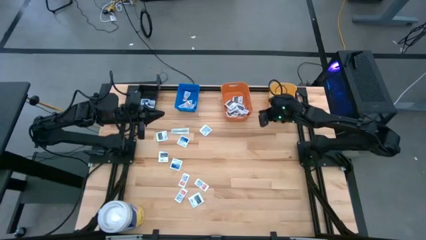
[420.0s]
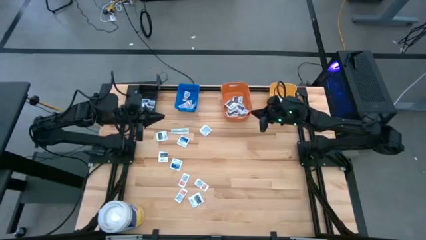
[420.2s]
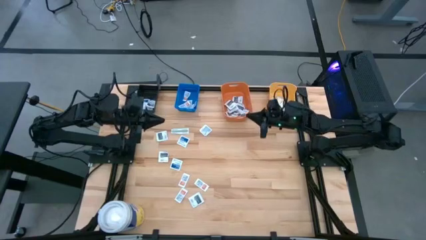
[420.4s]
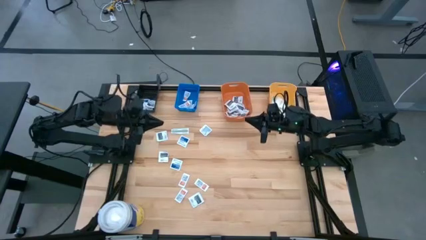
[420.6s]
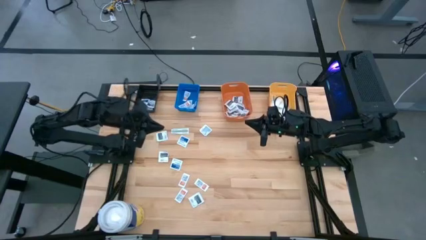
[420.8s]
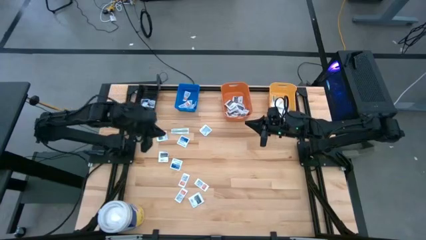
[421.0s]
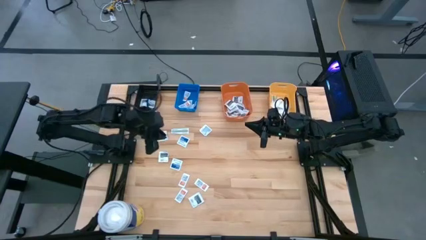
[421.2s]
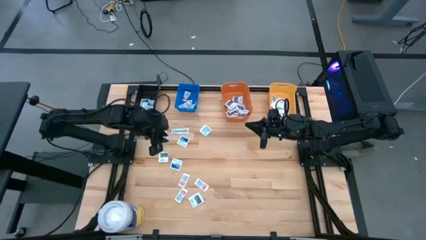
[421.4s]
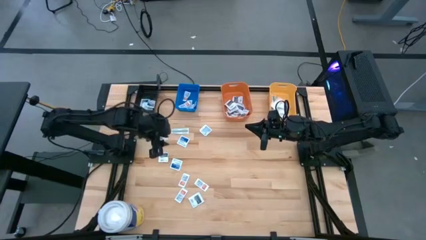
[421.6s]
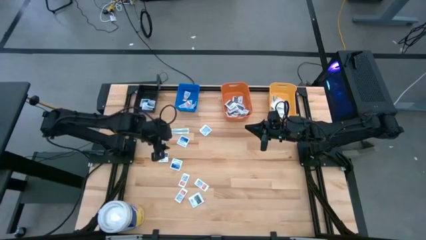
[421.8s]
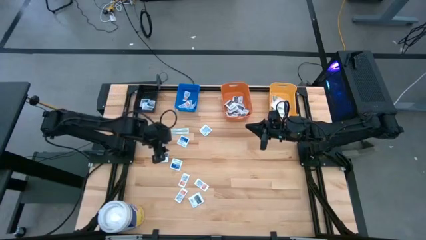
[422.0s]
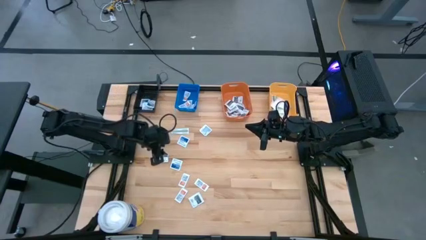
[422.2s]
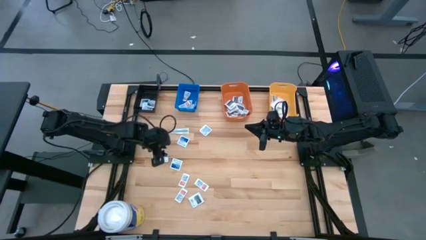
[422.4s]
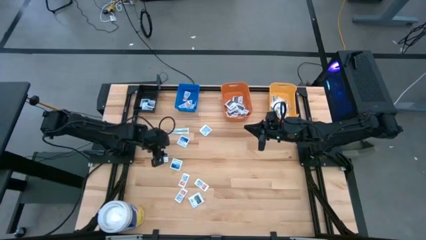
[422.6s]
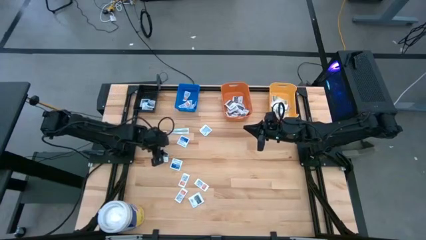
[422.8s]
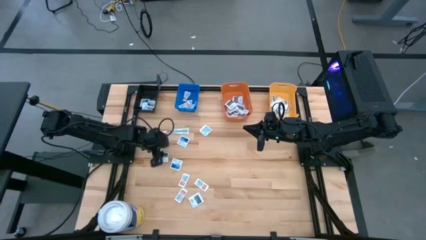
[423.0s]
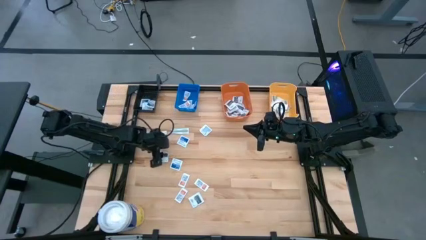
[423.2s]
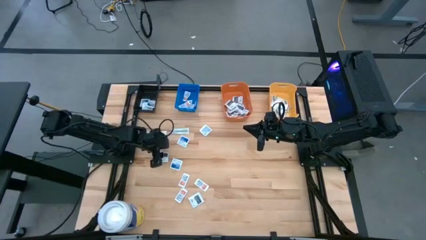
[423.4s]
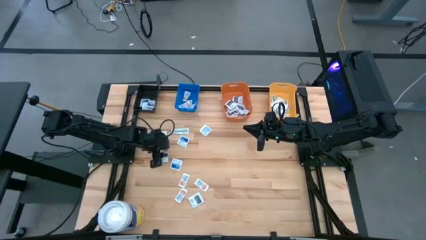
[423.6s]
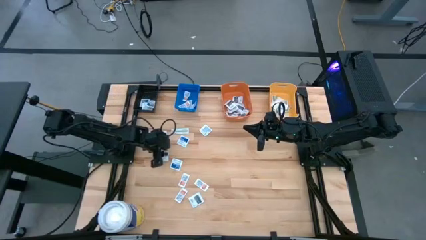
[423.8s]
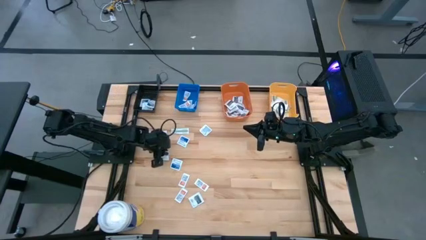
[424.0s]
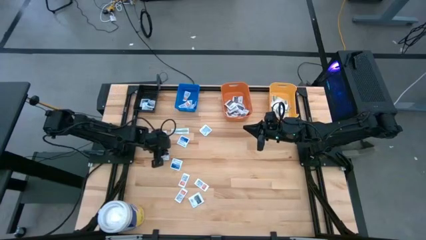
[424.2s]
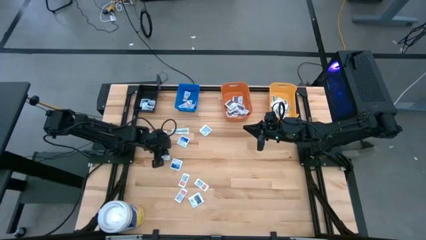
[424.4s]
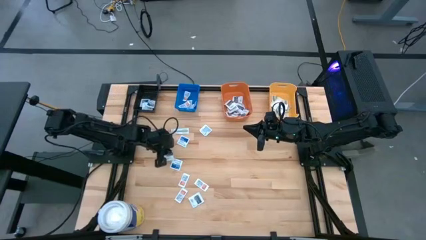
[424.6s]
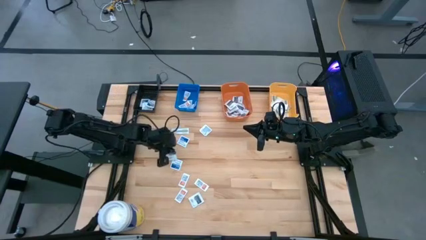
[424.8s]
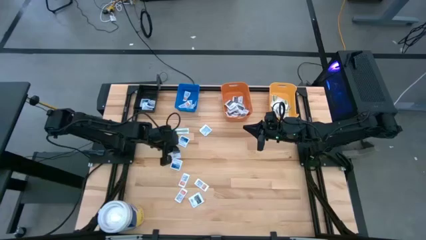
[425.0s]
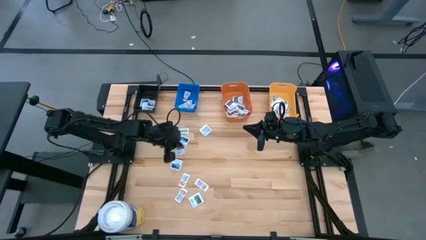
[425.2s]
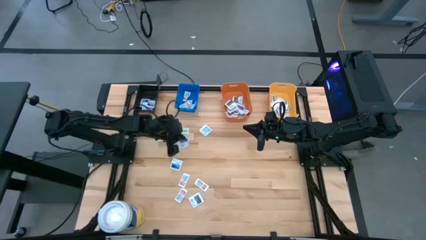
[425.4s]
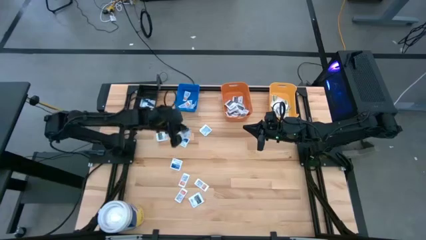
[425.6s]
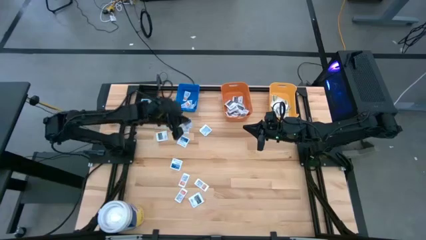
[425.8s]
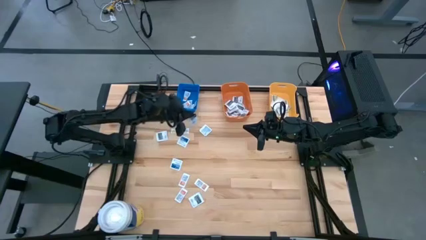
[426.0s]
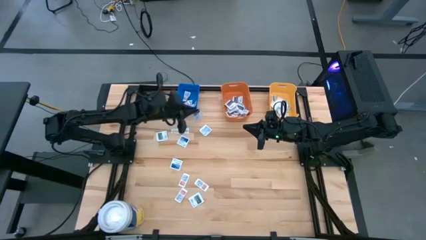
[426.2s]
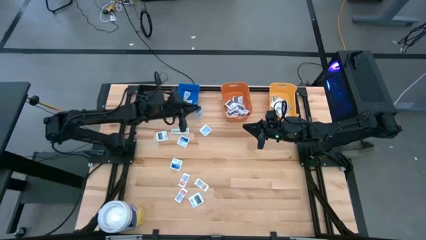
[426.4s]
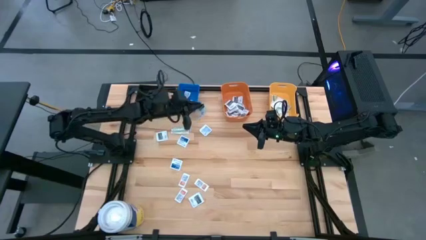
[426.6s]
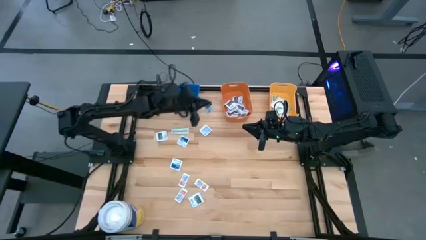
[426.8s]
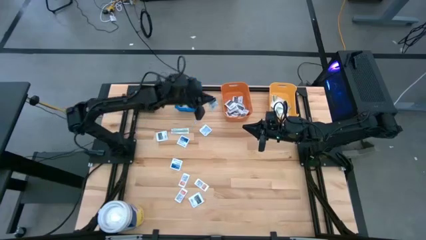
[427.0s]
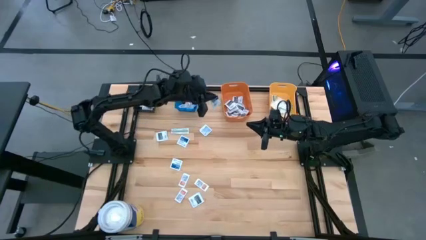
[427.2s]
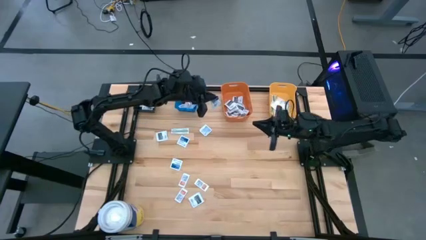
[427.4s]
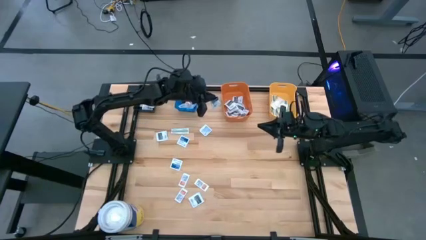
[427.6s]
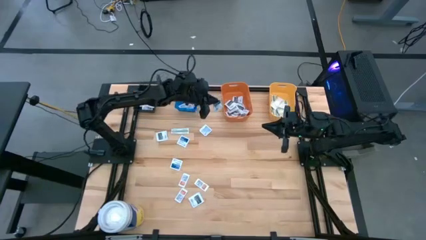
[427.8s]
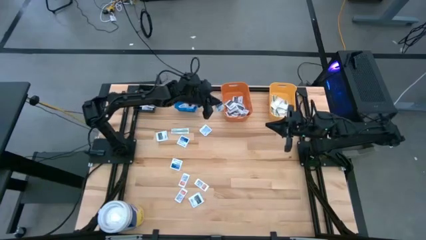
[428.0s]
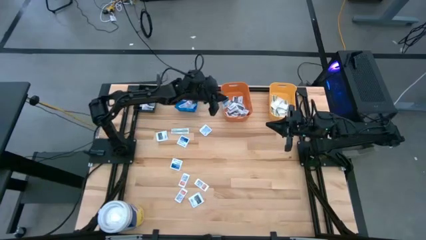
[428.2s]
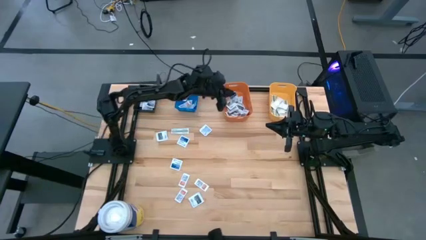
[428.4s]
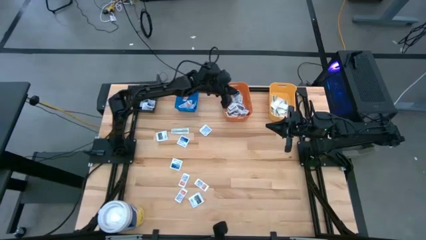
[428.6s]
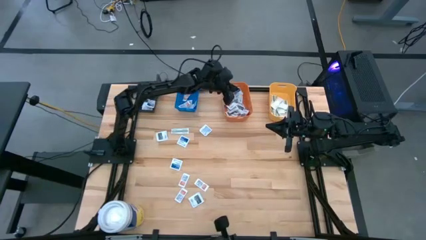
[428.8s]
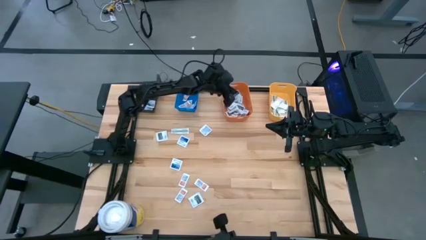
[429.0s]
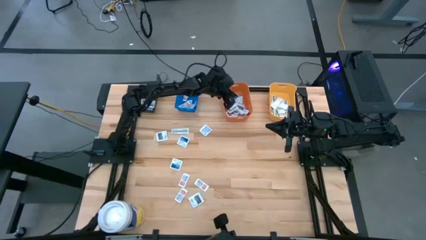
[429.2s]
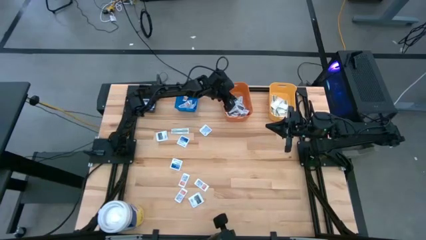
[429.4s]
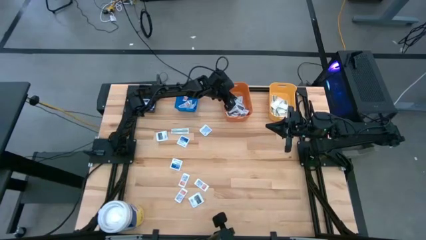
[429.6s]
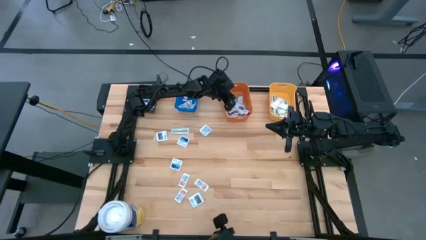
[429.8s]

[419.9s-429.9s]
Task: Pick & Place First Aid Supplies
Put the towelette pack into the orange bin

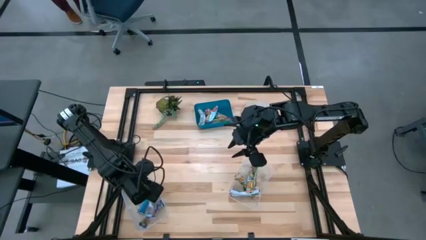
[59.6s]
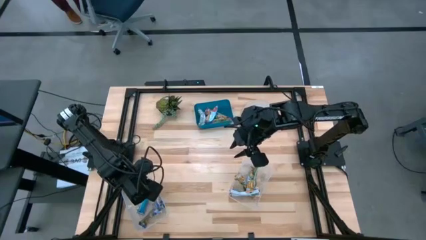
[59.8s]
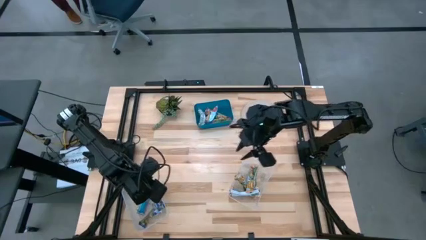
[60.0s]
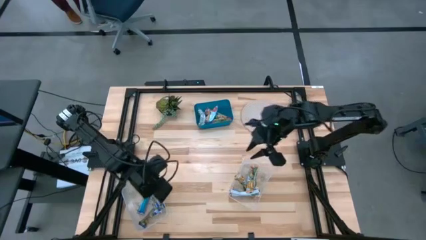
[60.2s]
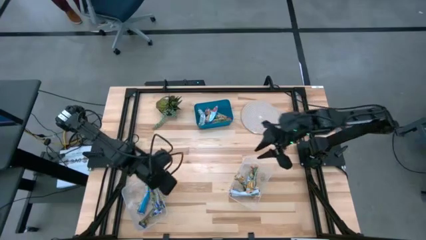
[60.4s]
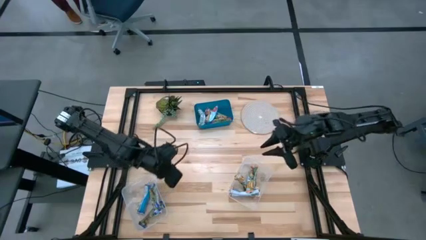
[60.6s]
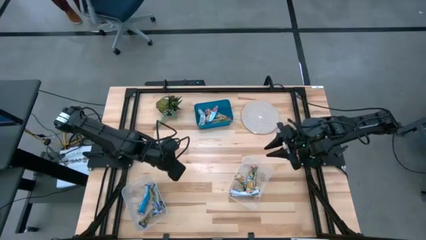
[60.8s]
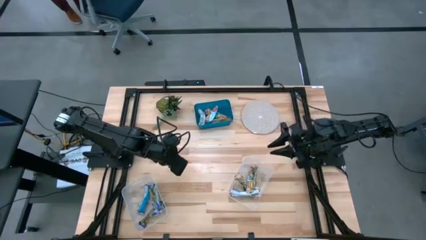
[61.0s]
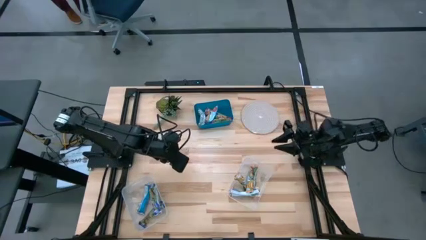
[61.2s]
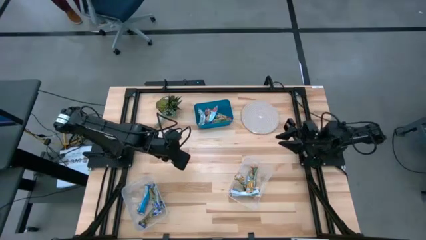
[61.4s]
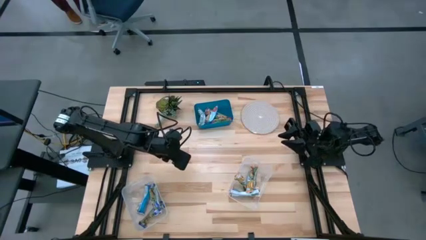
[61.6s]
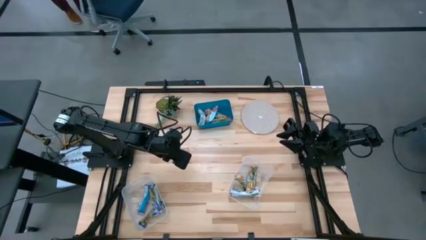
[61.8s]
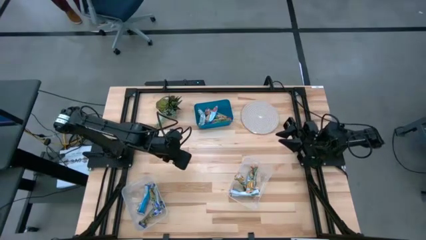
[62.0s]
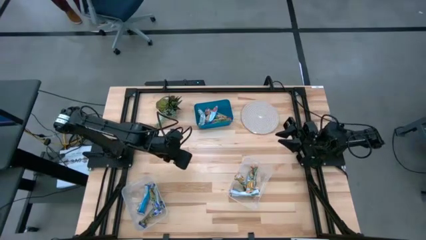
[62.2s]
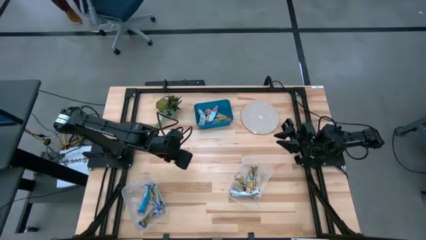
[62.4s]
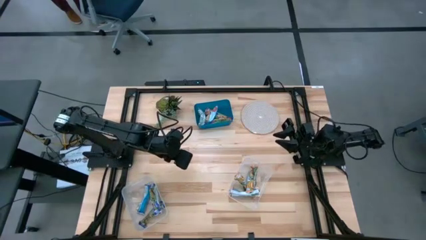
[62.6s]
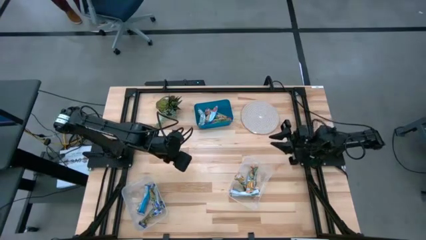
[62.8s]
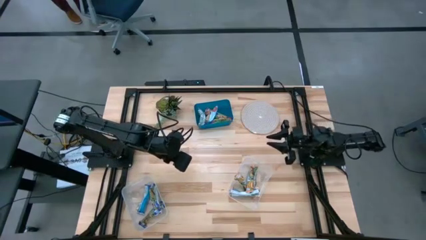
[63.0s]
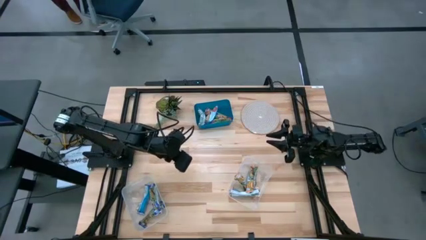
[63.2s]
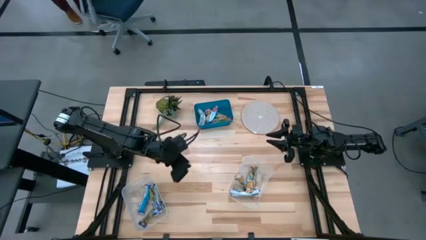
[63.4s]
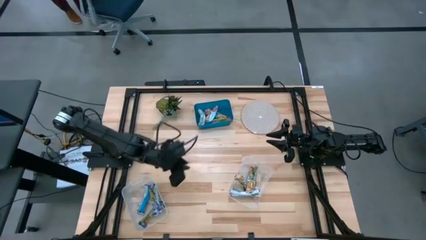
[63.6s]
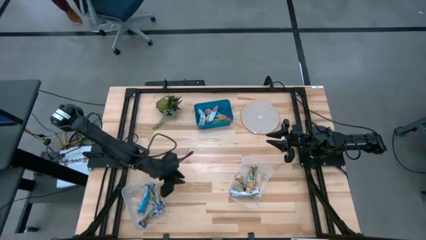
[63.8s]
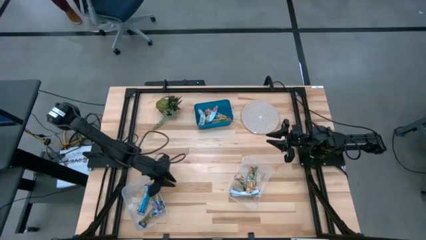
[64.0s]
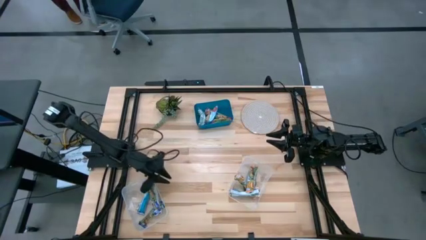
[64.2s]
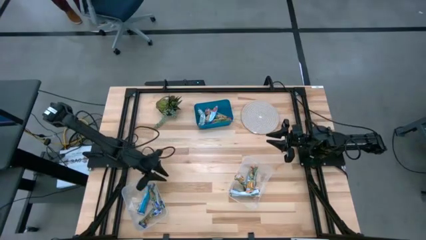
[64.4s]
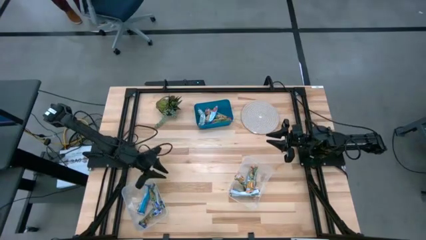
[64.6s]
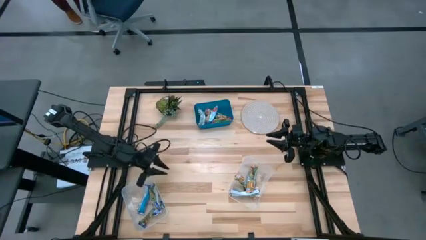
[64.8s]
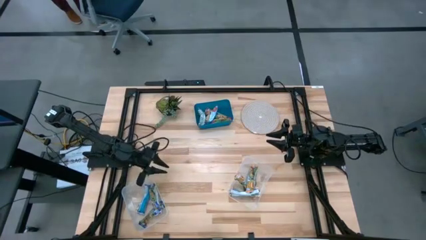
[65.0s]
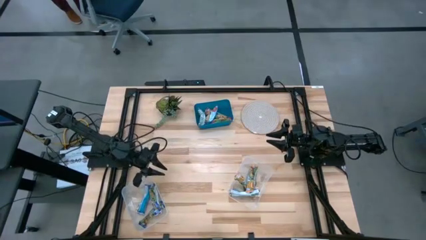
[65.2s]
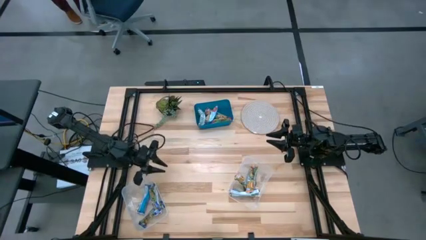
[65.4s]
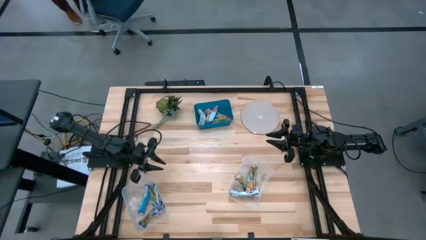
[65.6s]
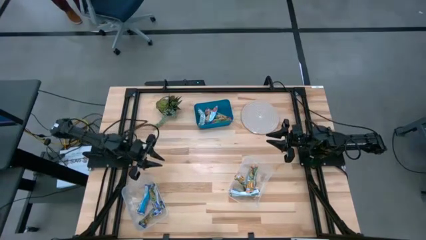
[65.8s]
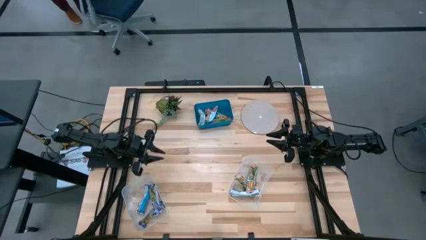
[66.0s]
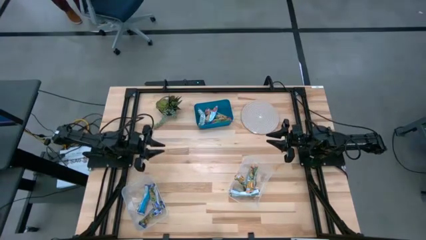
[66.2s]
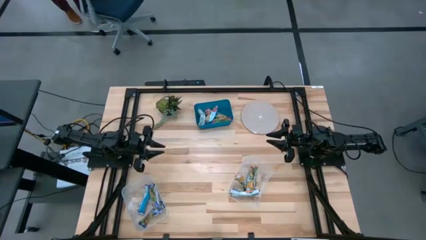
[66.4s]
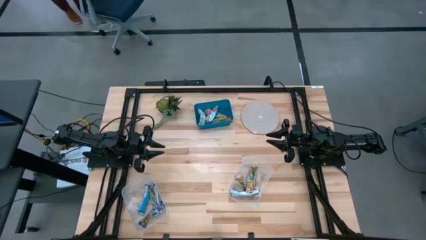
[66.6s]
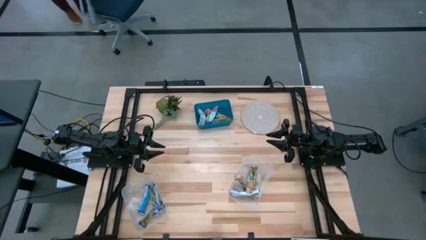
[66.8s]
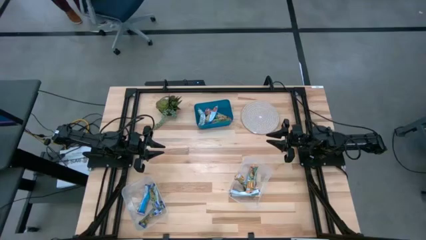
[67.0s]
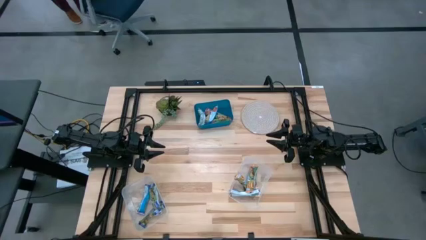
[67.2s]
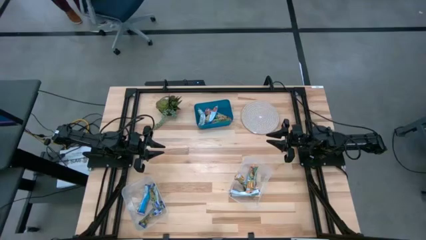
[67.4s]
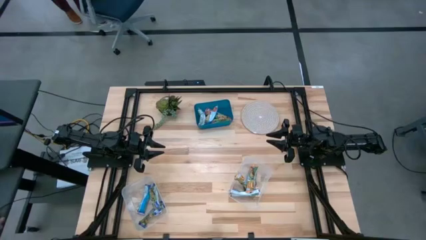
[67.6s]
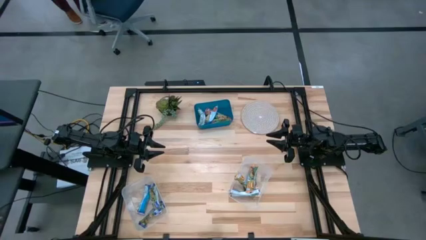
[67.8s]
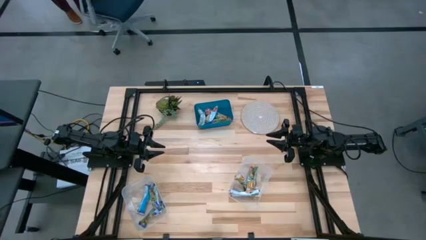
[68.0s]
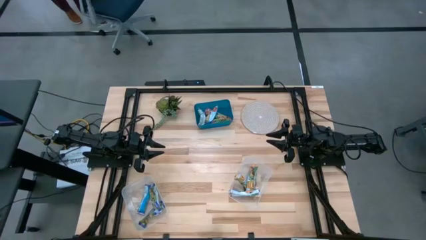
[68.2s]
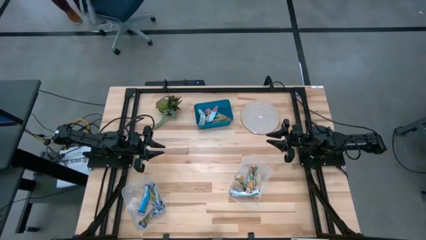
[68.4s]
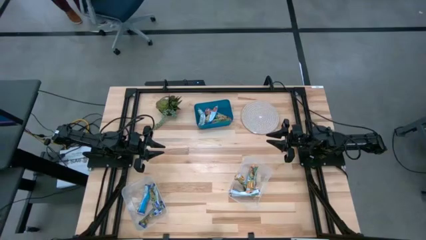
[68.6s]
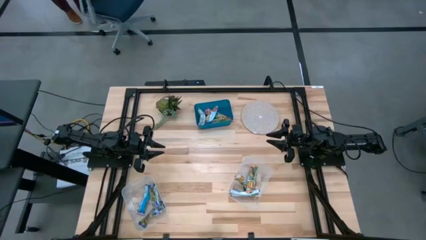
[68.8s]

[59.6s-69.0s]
Task: Pick and place Granola Bars by type
Return to Home Position
